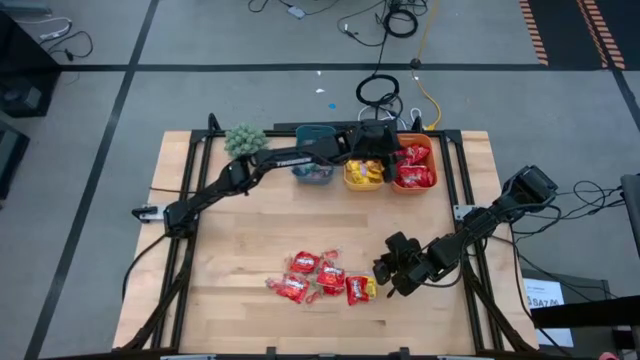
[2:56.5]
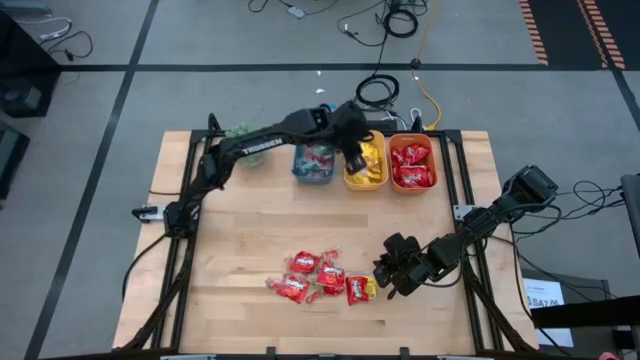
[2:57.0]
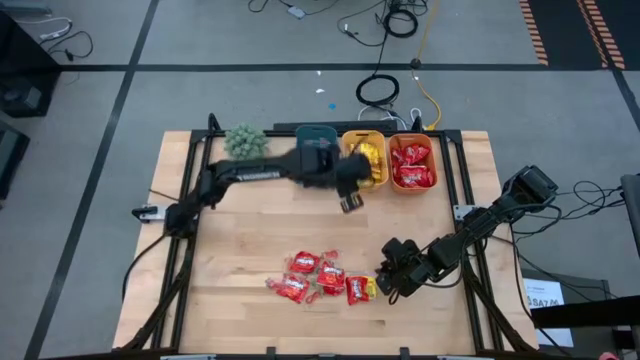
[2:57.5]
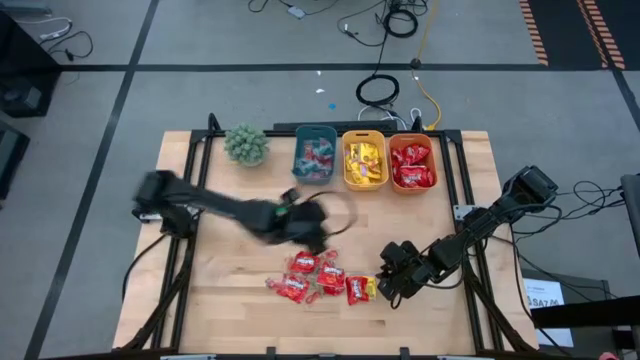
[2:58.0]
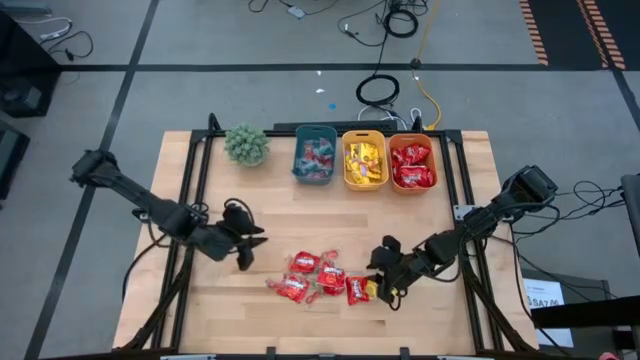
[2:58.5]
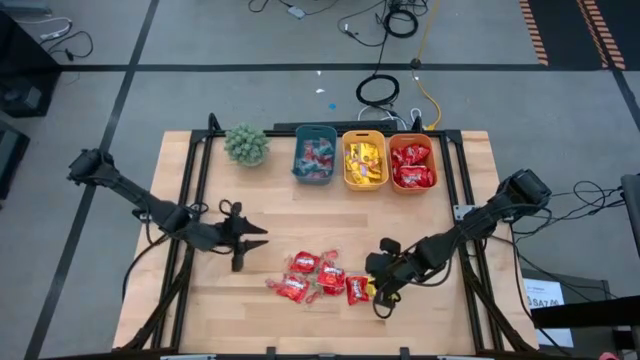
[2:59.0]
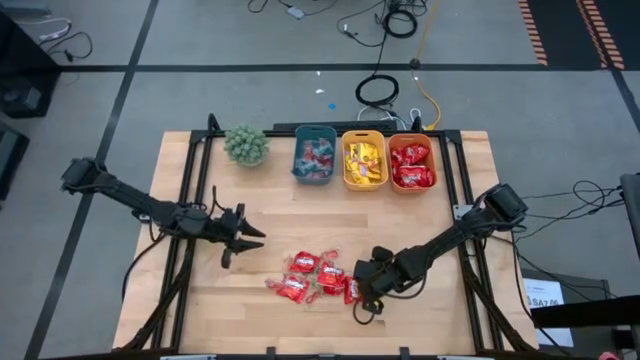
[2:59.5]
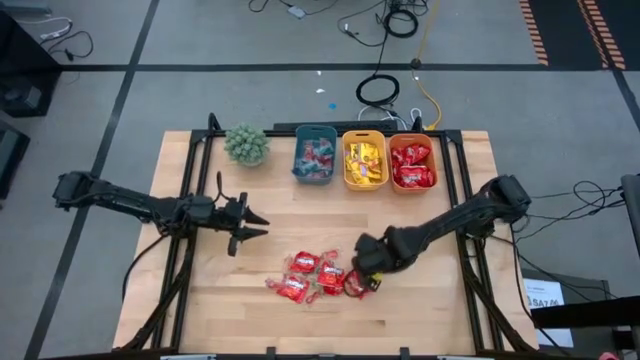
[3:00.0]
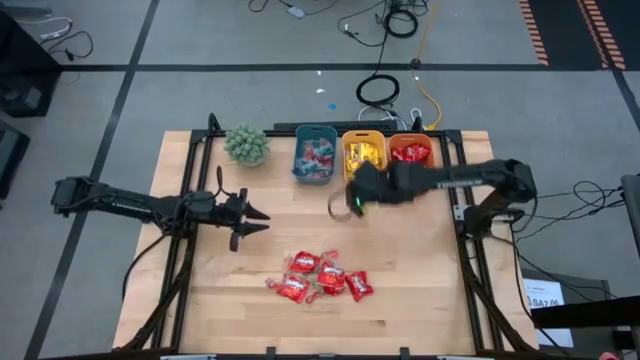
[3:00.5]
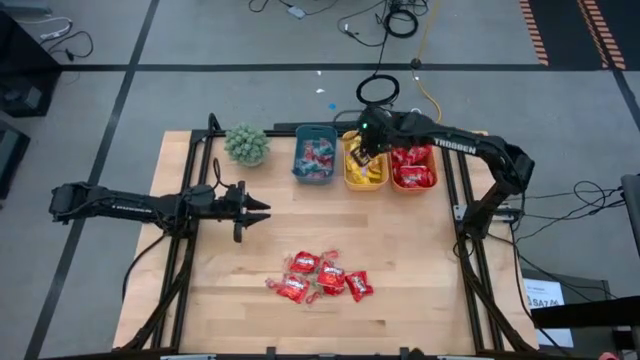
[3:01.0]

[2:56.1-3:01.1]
Task: Sort candy
Put the yellow candy into the yellow bin

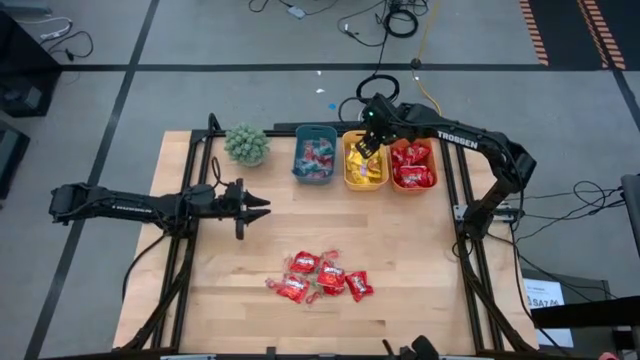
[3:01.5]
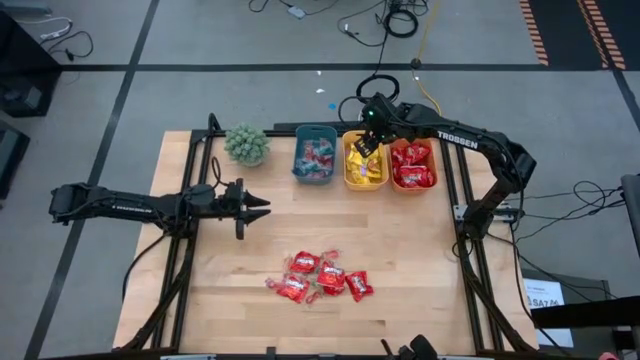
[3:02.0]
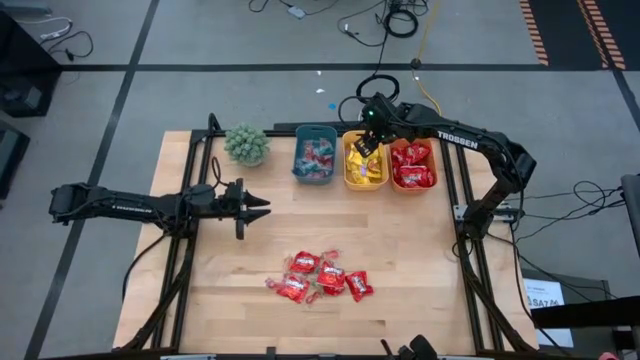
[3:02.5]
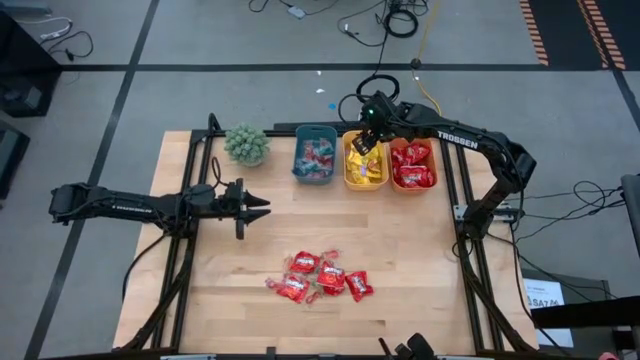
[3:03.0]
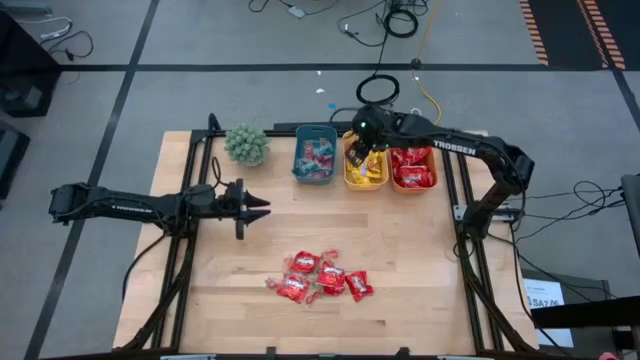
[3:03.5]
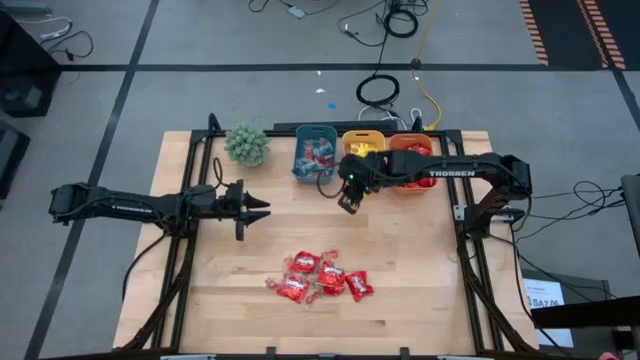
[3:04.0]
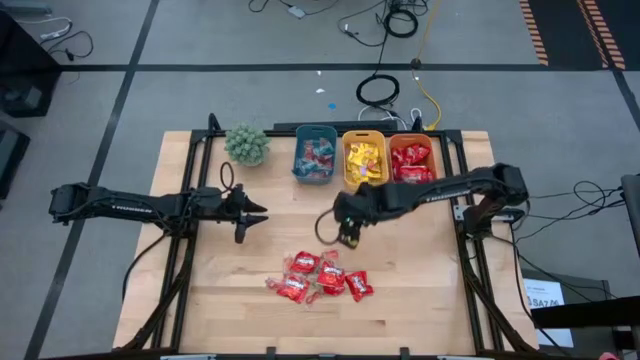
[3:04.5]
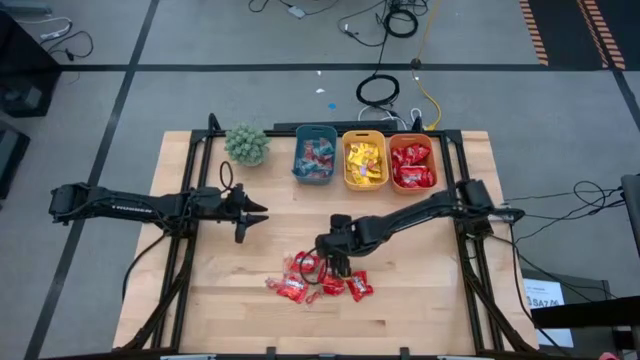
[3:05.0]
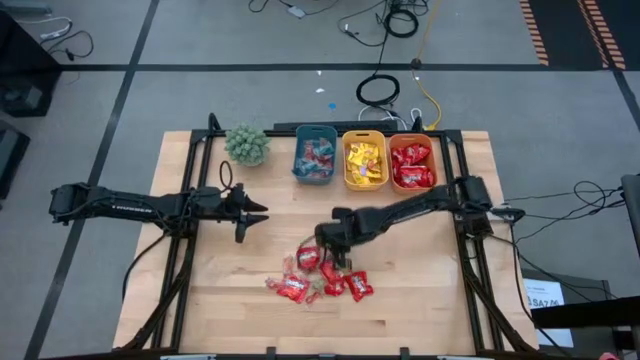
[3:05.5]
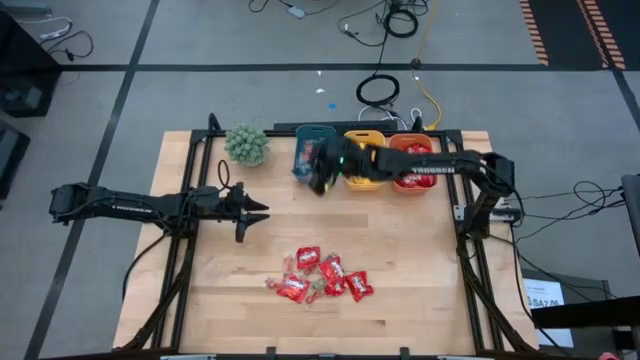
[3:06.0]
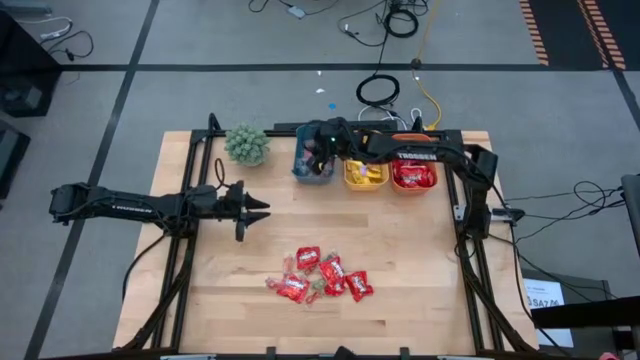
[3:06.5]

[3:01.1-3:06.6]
Put the orange gummy into the blue bin

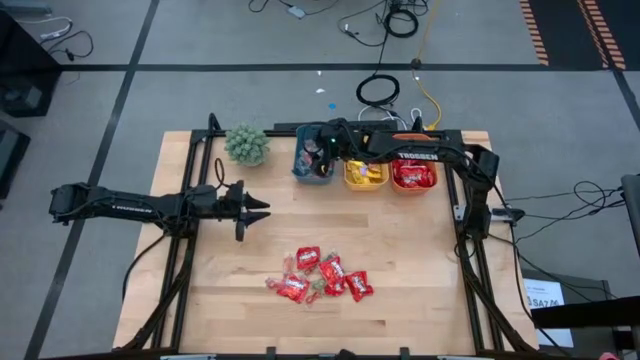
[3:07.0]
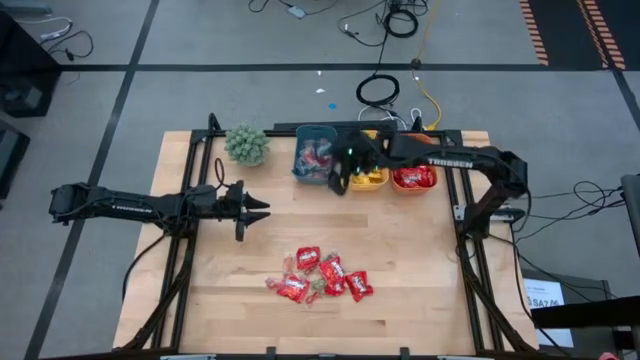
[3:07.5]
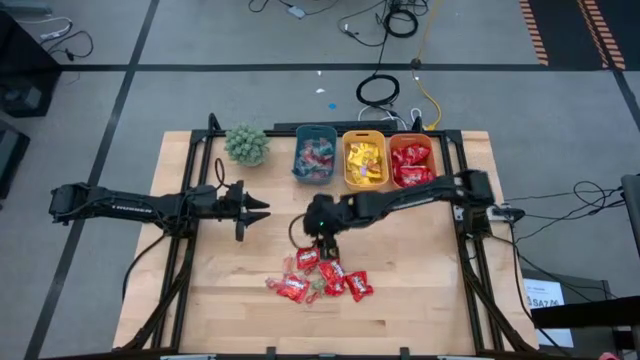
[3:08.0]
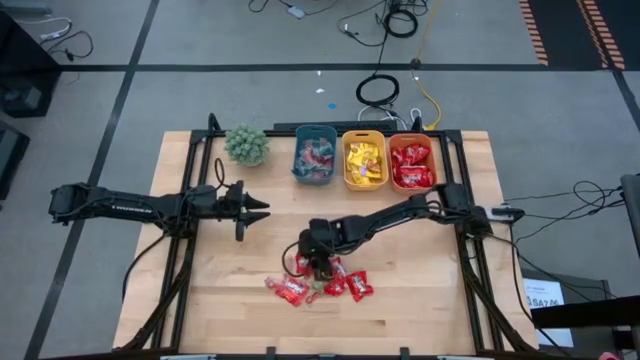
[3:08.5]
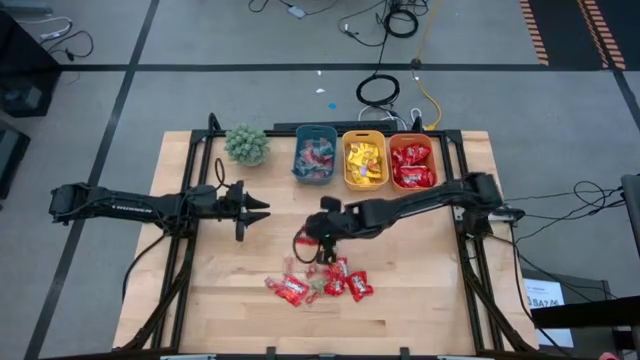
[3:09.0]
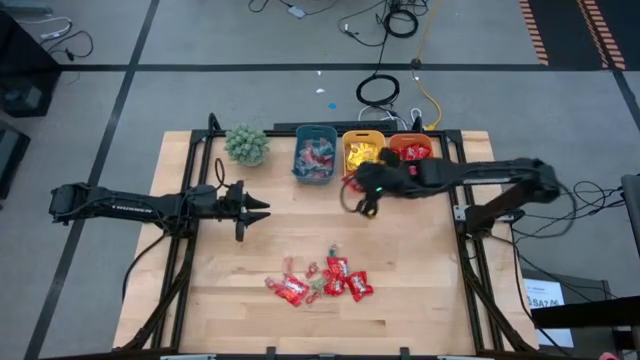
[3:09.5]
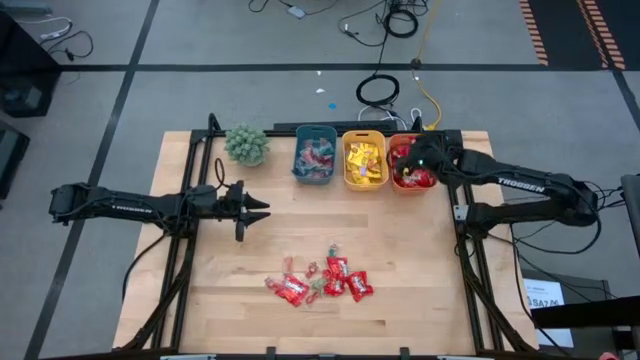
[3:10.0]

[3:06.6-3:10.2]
Put the red candy into the orange bin

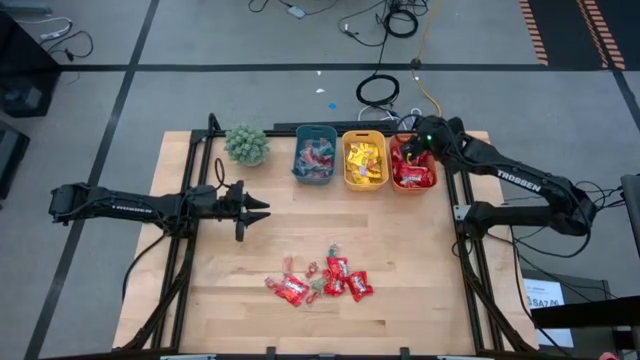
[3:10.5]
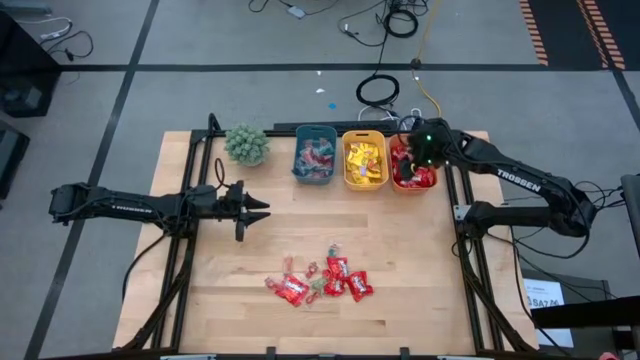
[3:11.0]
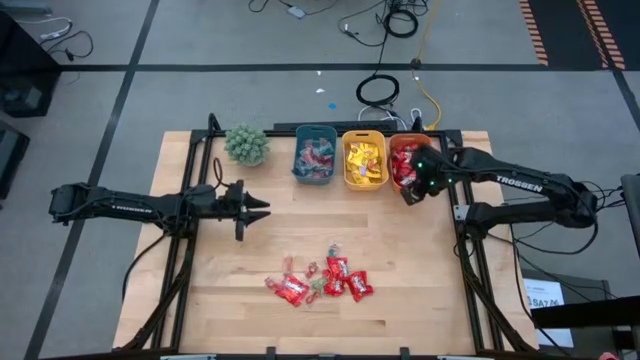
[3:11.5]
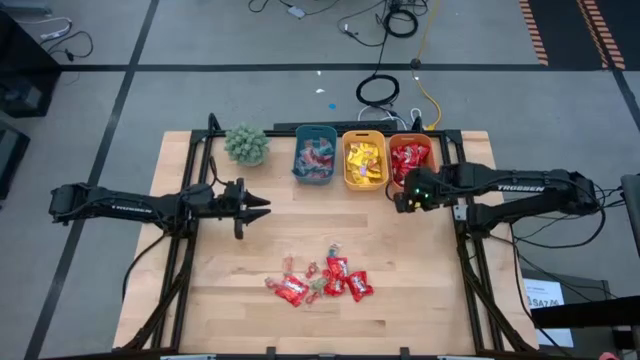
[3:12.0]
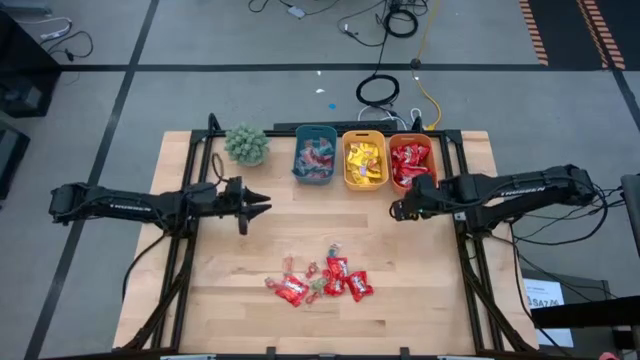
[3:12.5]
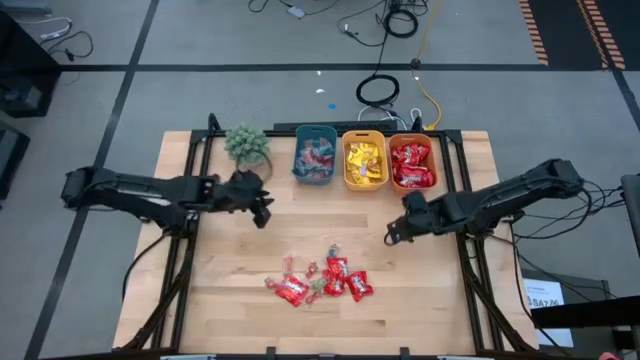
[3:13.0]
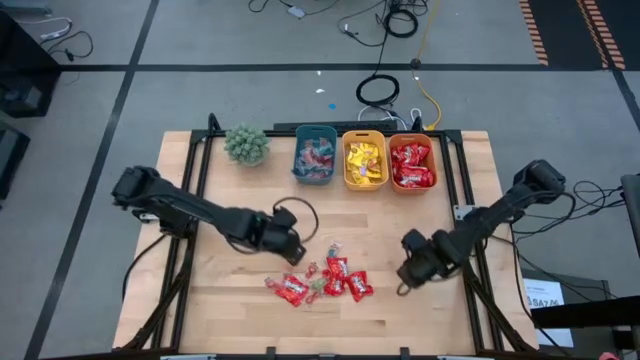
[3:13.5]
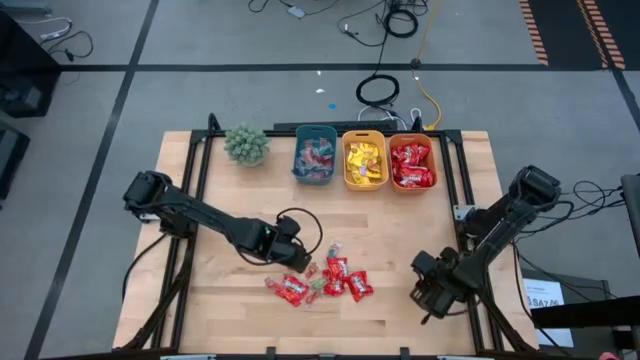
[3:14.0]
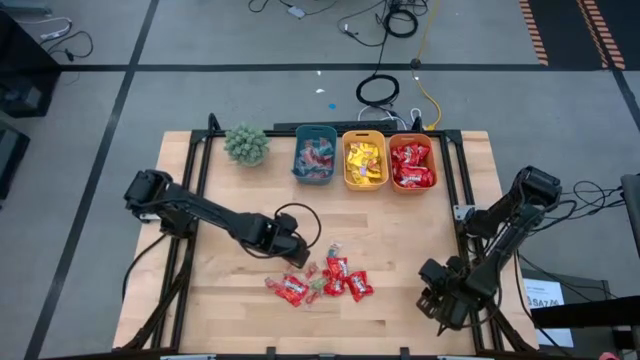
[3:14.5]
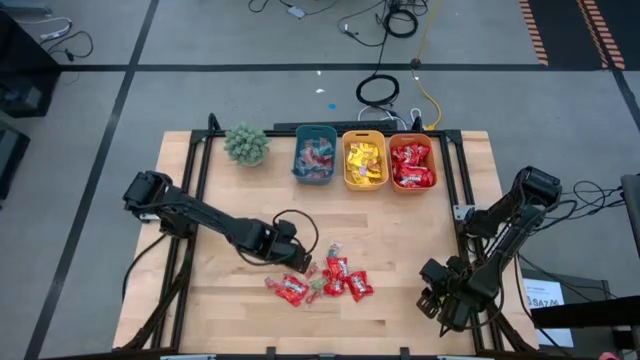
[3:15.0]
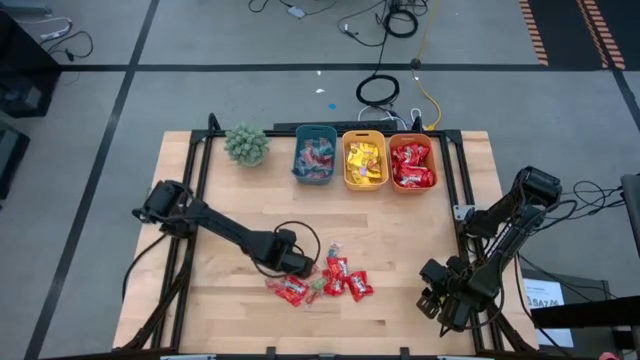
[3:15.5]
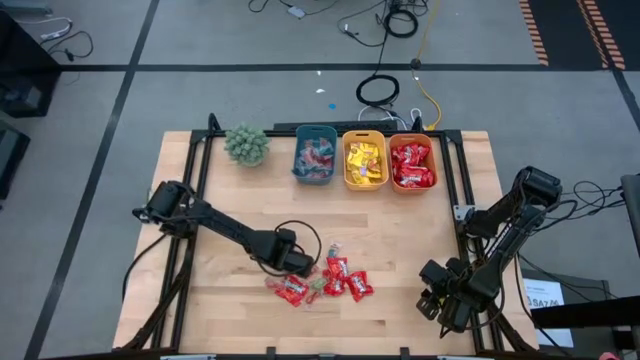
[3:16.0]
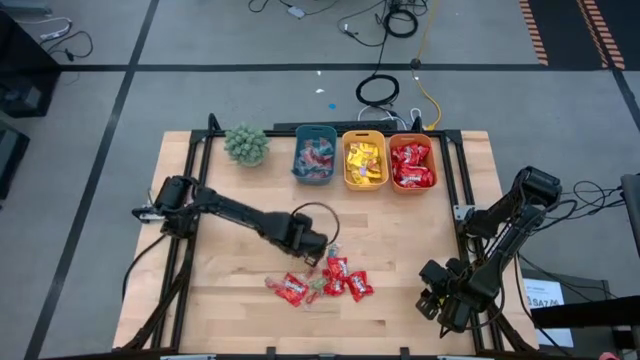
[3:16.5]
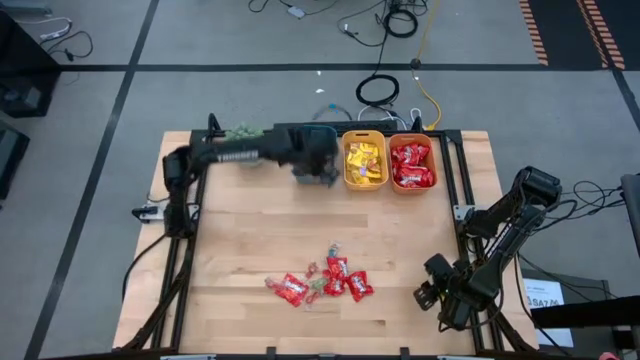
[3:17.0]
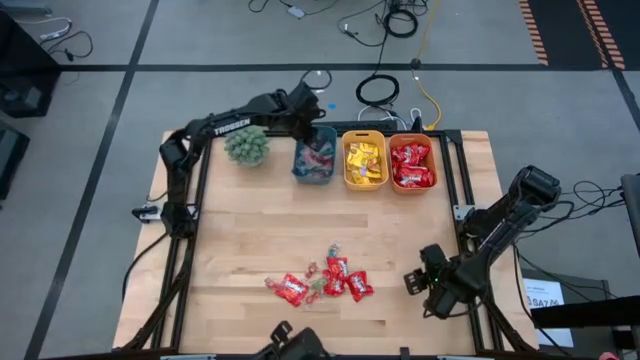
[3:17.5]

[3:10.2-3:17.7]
Put the orange gummy into the blue bin
